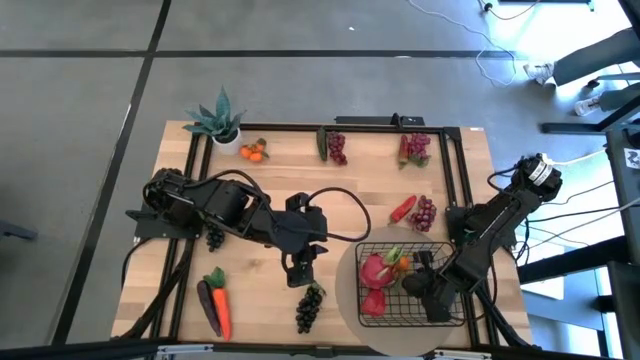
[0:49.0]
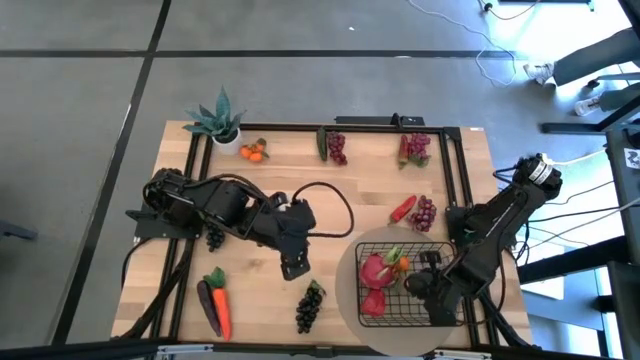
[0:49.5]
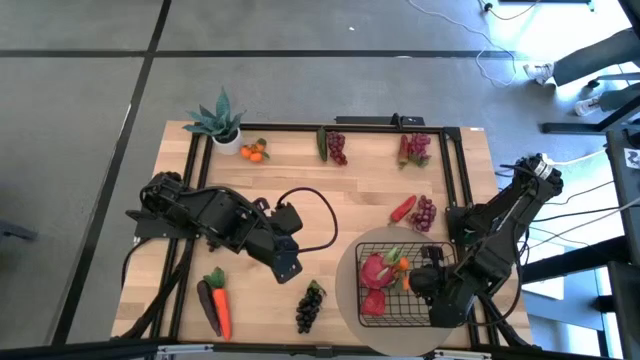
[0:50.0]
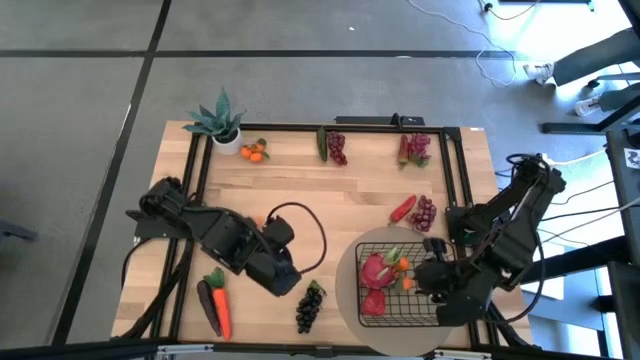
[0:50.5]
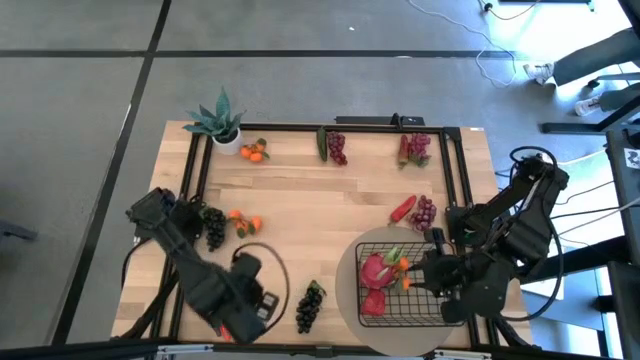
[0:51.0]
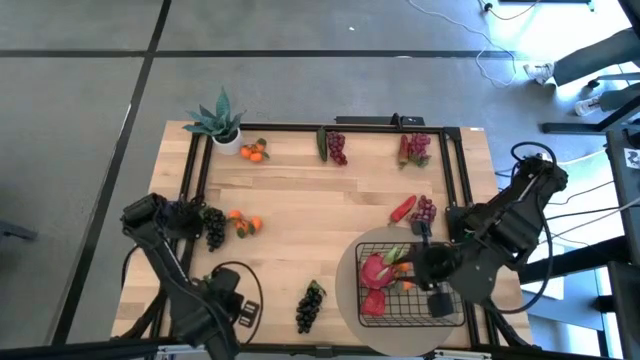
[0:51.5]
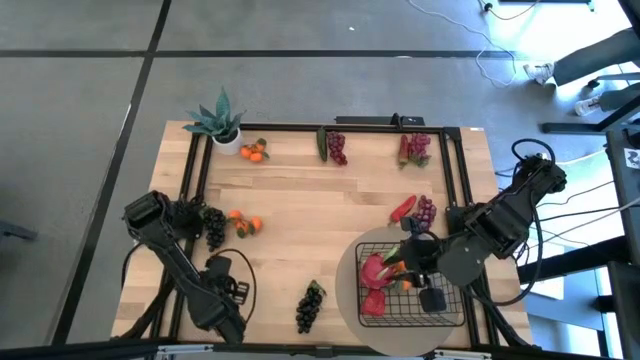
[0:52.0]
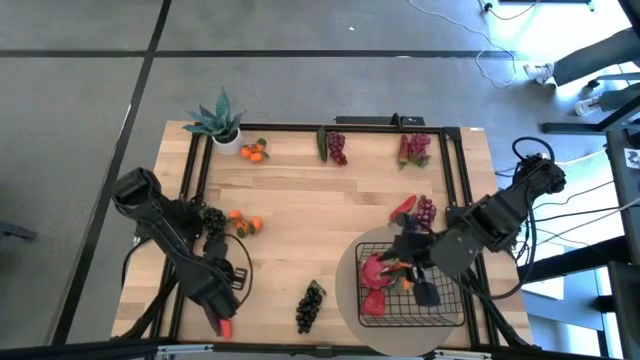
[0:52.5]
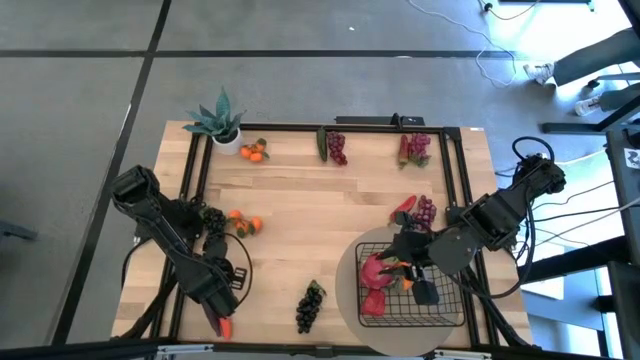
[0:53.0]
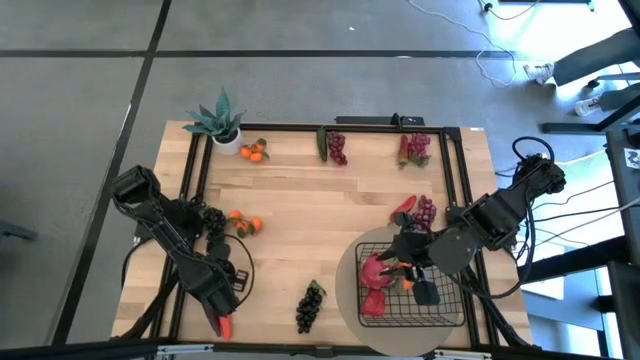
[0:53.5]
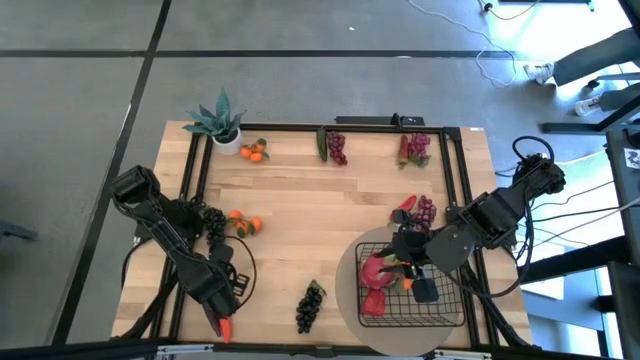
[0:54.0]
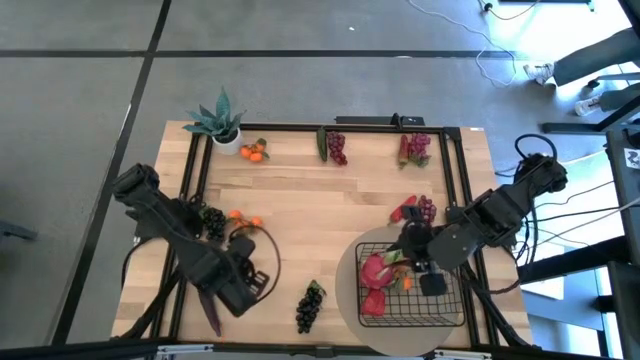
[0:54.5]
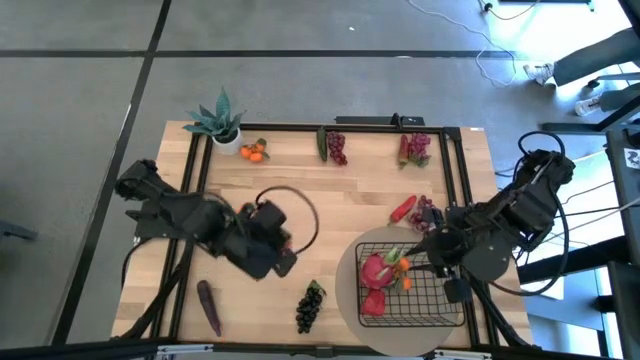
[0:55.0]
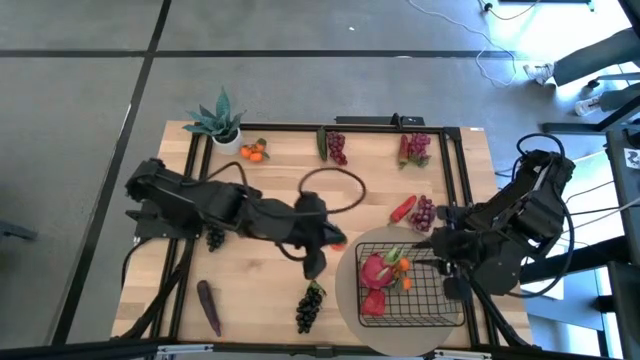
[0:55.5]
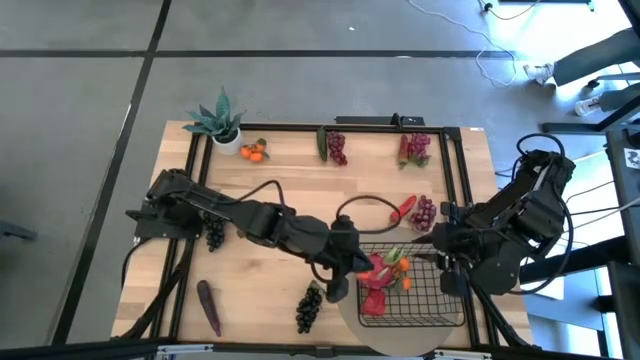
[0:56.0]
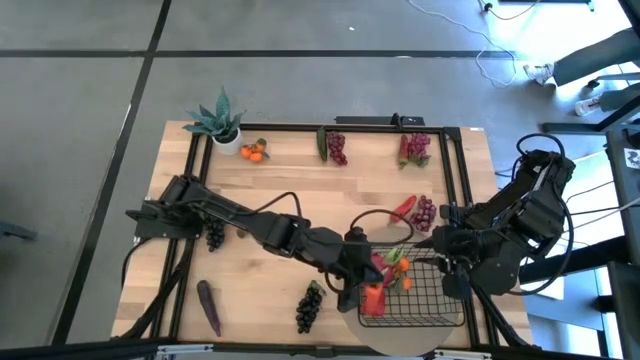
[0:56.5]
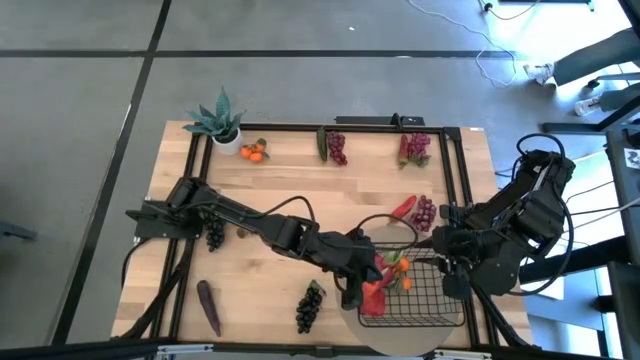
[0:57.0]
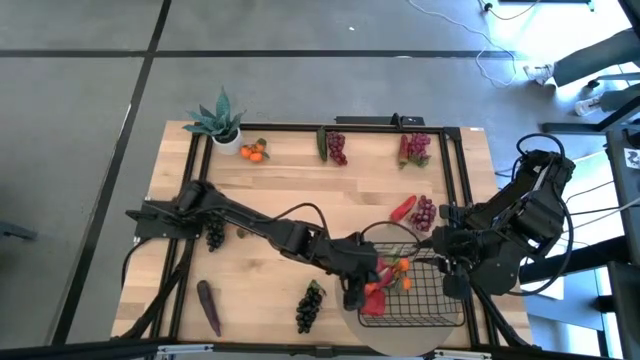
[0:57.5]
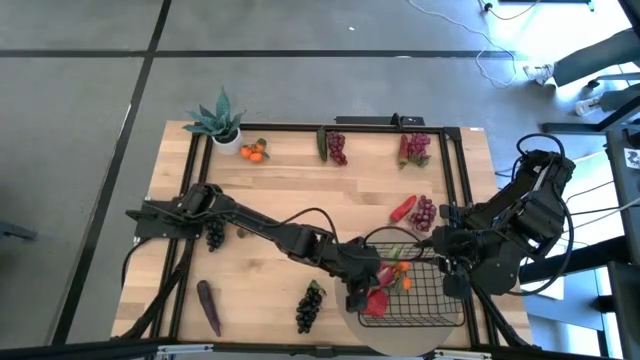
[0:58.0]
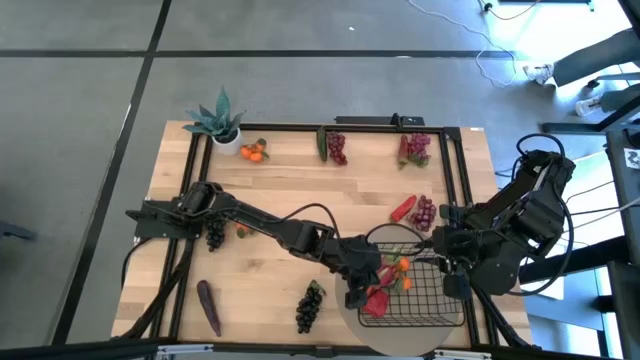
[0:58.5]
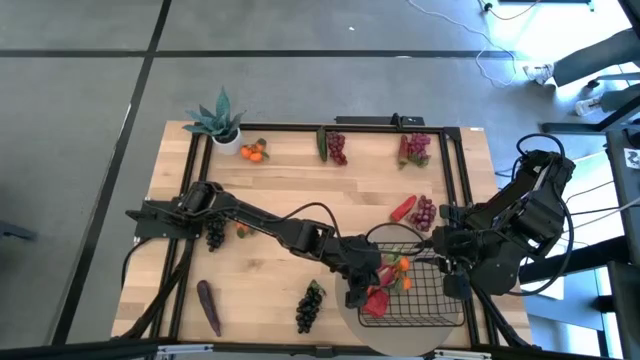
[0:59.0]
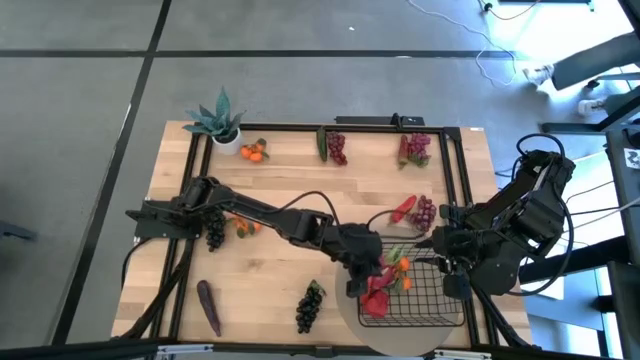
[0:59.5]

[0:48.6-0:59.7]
Task: Build produce basket
Put the carrot into the black wire basket

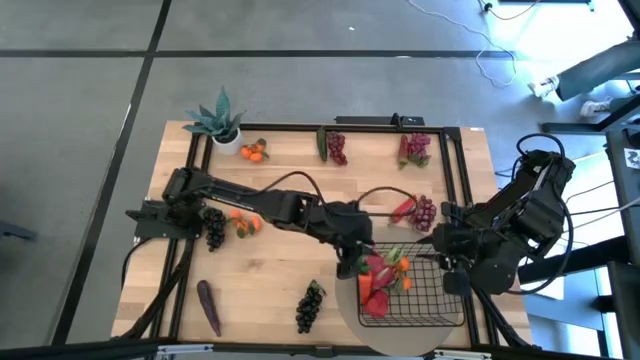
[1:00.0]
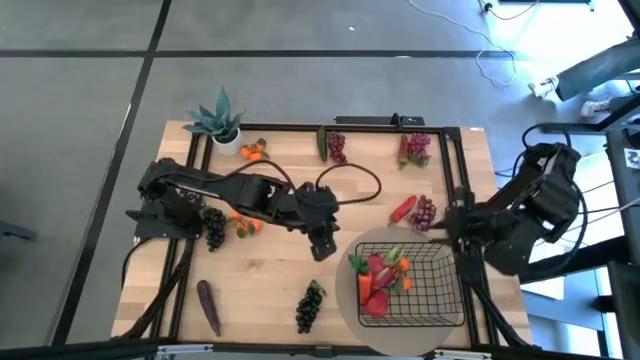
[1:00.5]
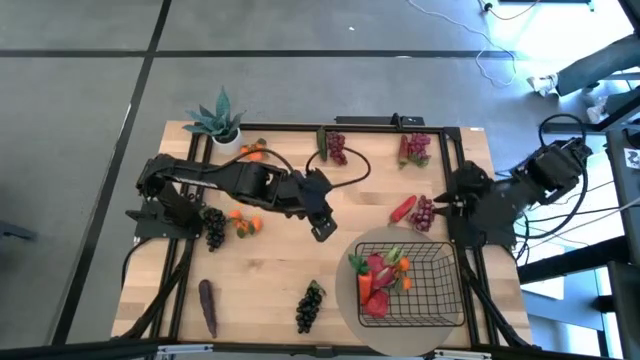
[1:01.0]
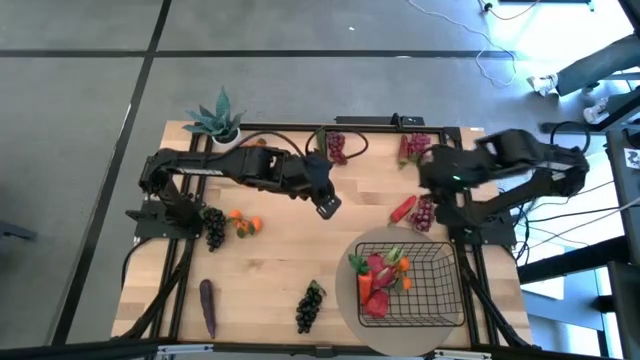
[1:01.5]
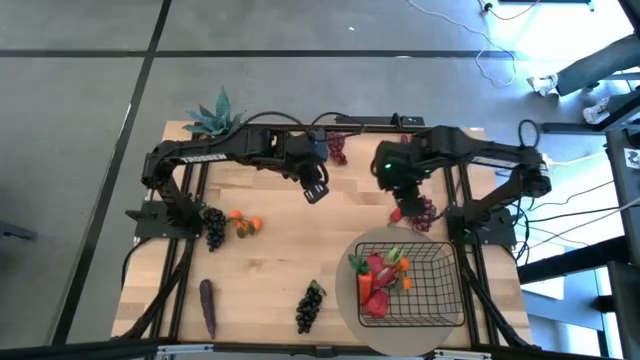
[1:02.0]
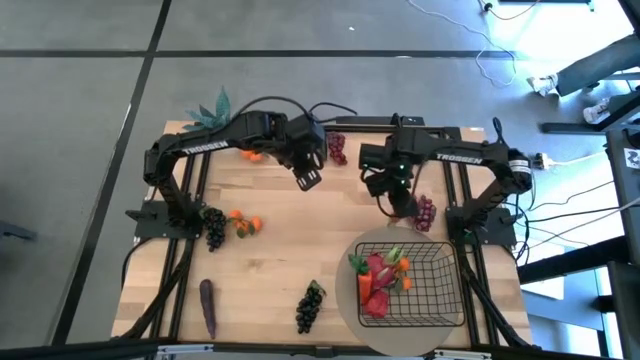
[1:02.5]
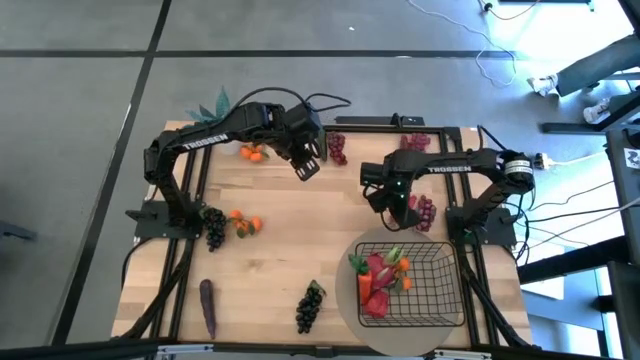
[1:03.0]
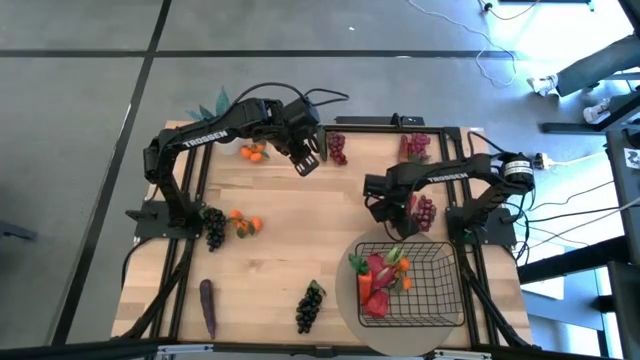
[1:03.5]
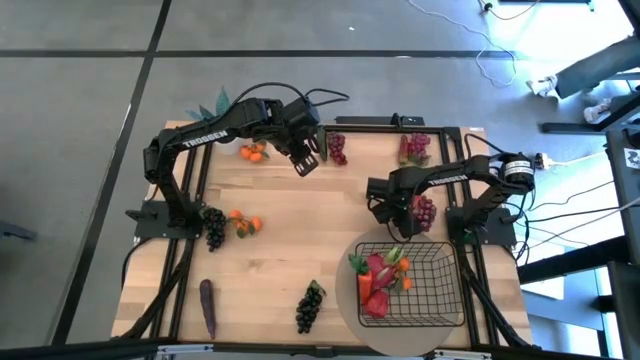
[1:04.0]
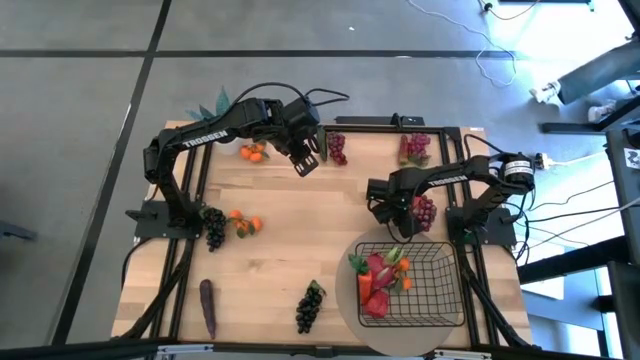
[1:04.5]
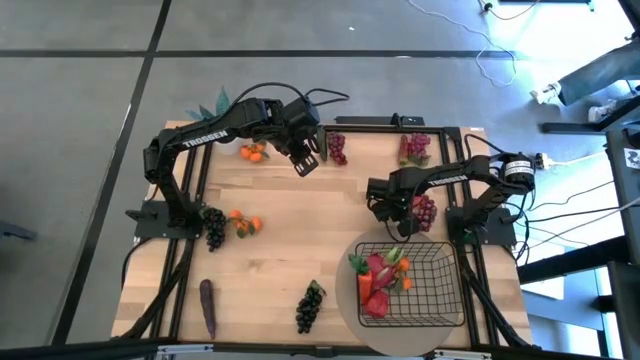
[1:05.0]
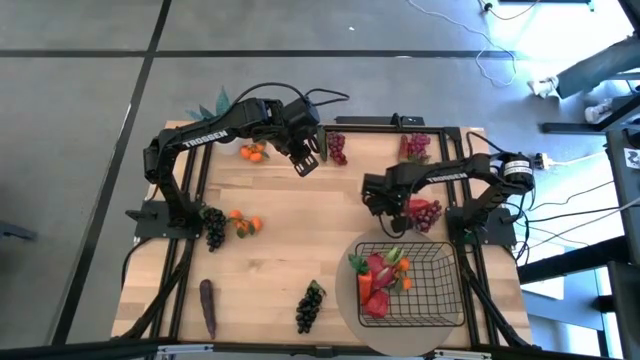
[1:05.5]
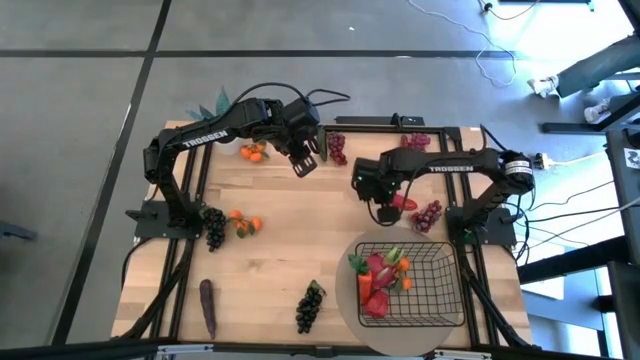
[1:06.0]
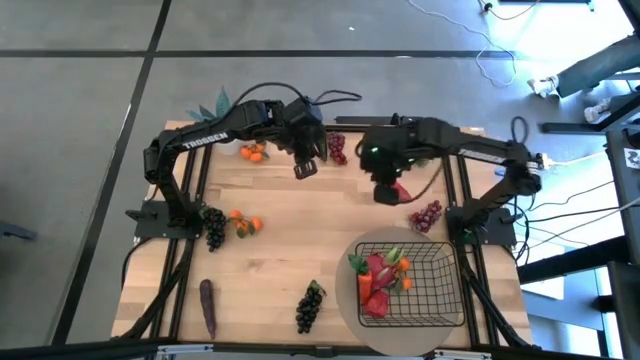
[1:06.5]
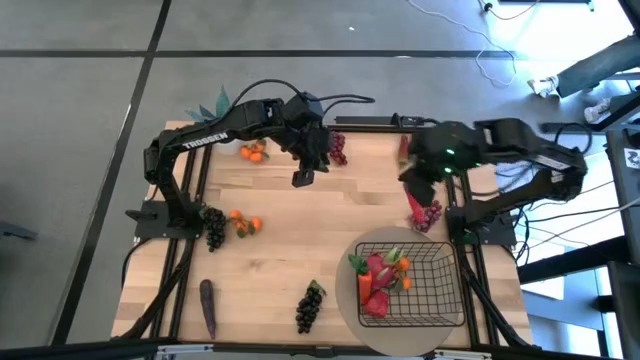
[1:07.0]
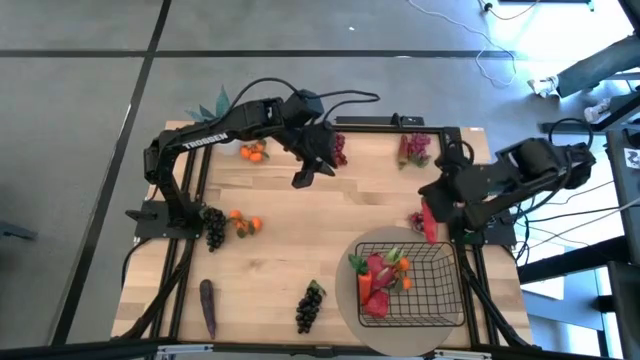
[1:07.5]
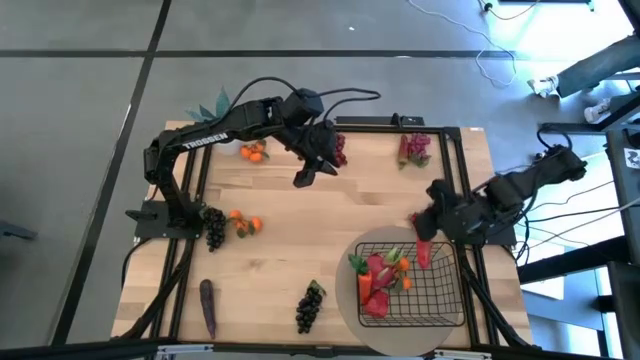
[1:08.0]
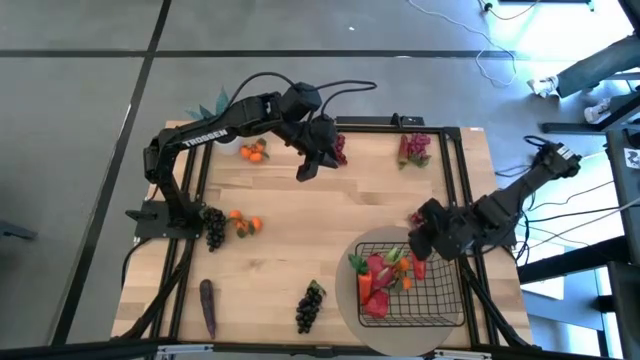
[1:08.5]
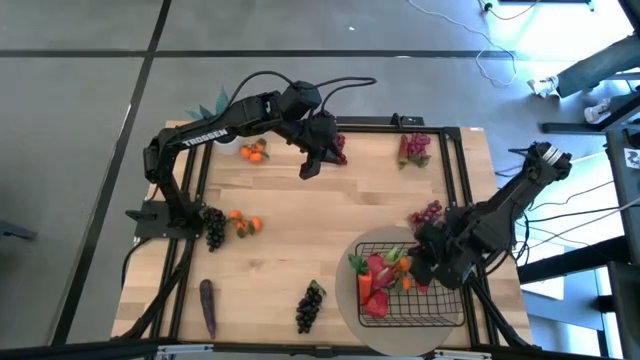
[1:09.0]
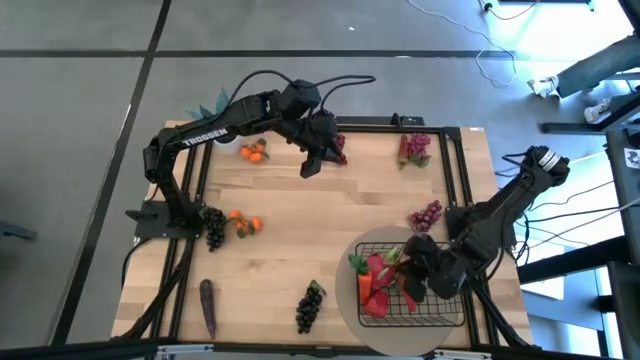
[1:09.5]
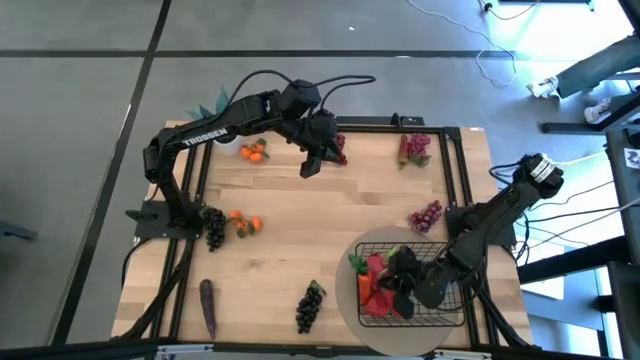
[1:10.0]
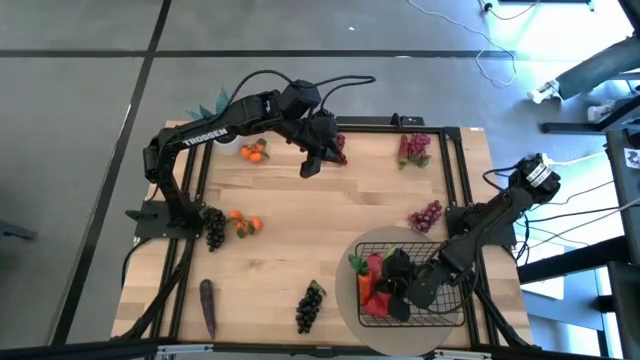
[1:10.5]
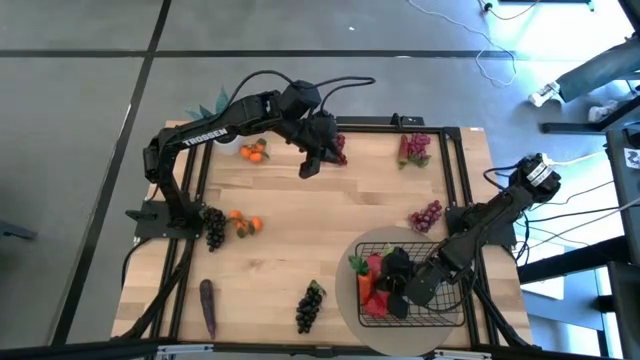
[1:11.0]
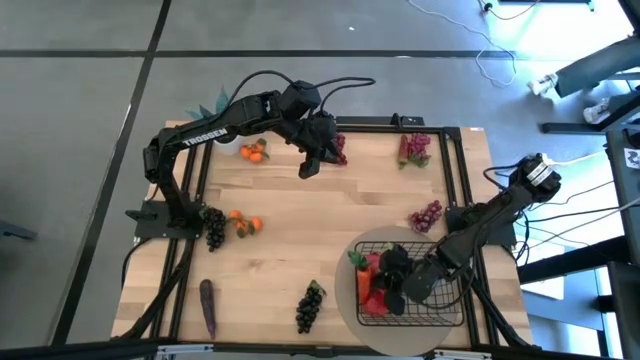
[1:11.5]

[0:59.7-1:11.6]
Put the bottom red chili pepper into the black wire basket
